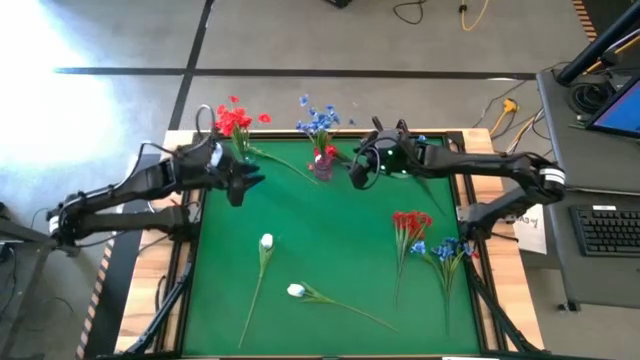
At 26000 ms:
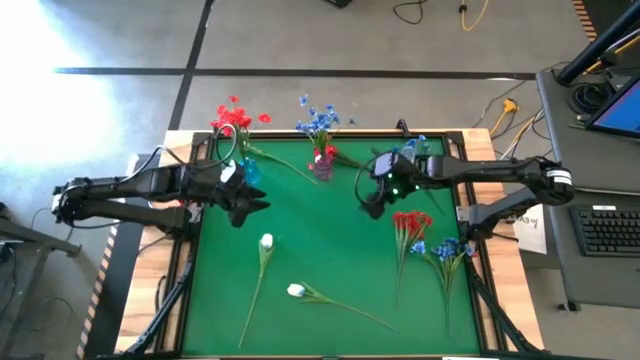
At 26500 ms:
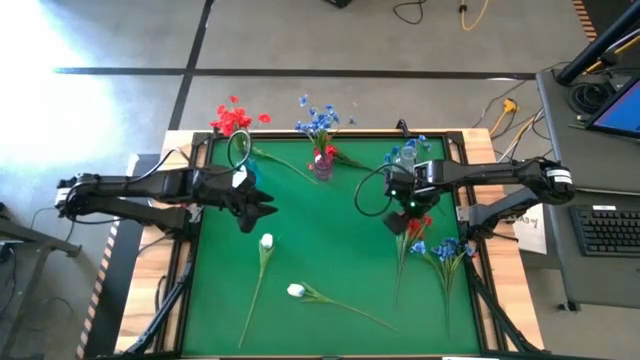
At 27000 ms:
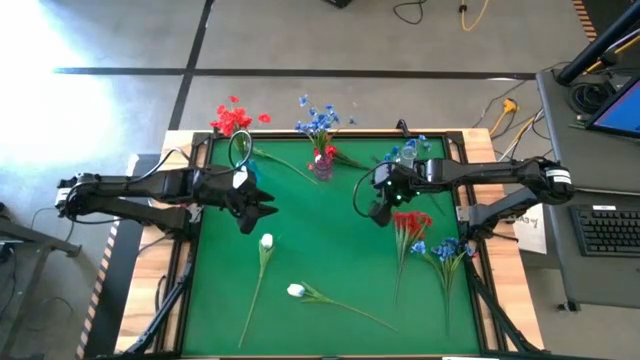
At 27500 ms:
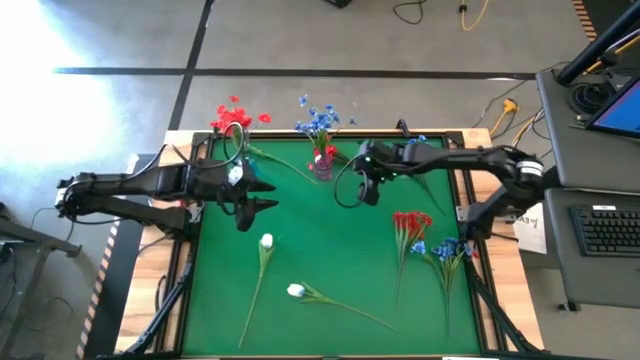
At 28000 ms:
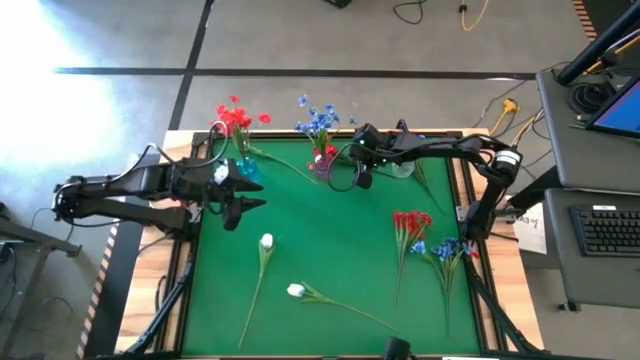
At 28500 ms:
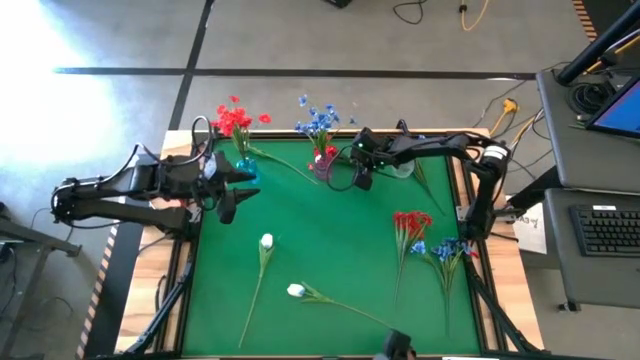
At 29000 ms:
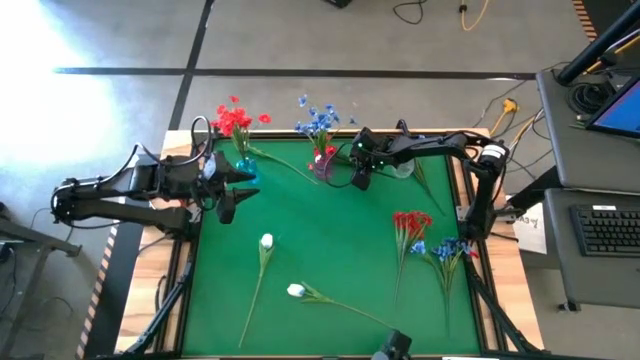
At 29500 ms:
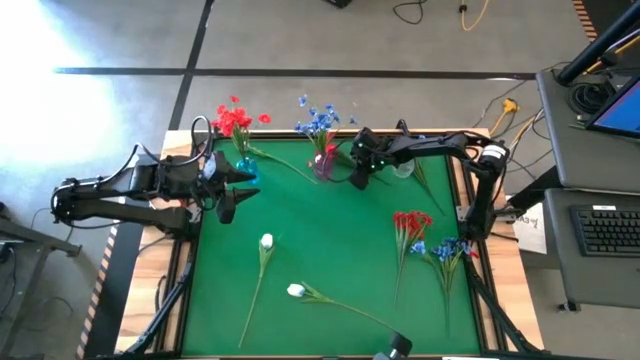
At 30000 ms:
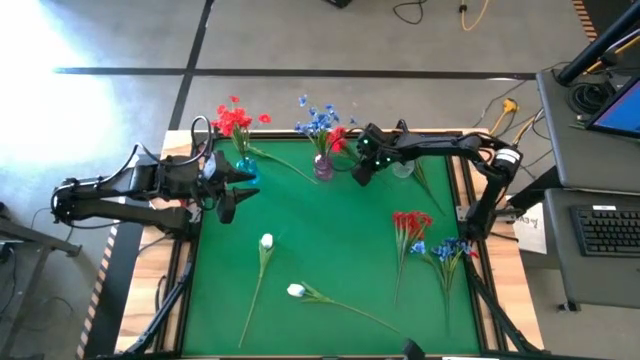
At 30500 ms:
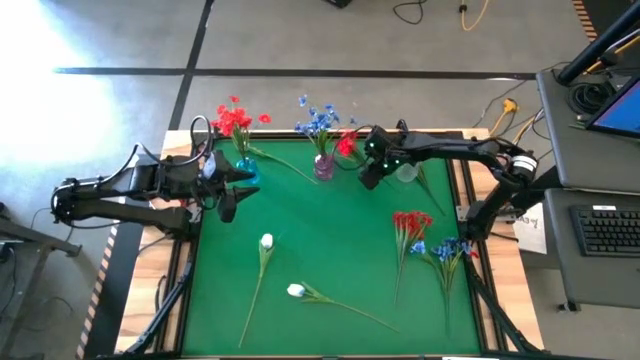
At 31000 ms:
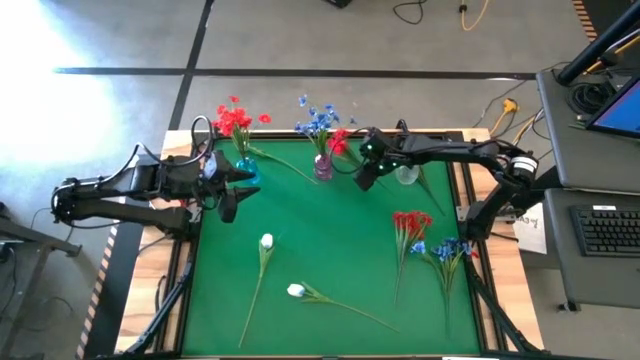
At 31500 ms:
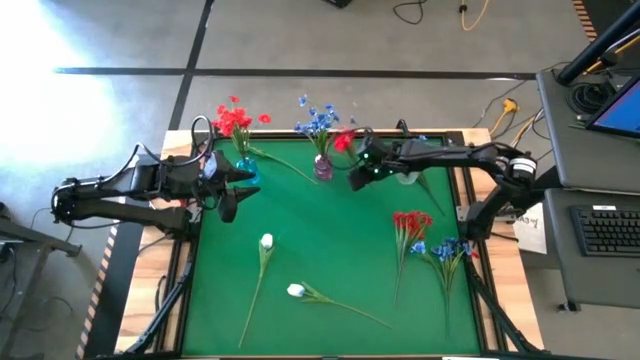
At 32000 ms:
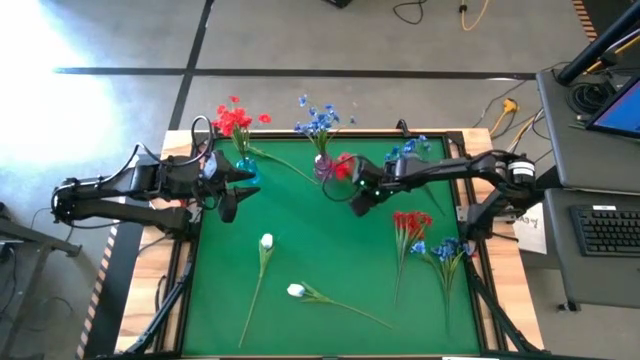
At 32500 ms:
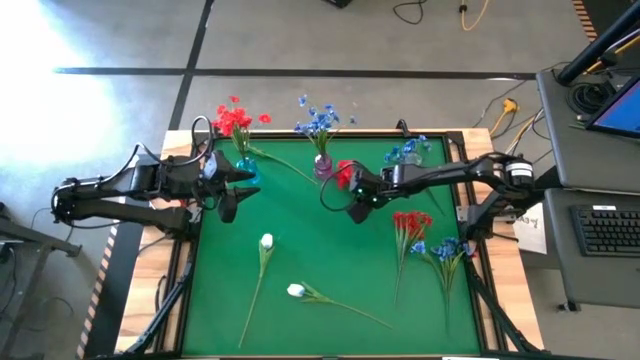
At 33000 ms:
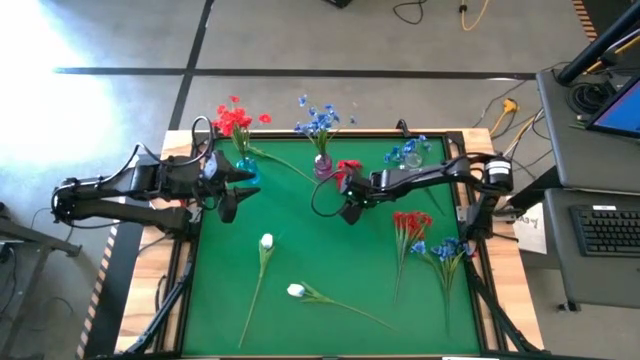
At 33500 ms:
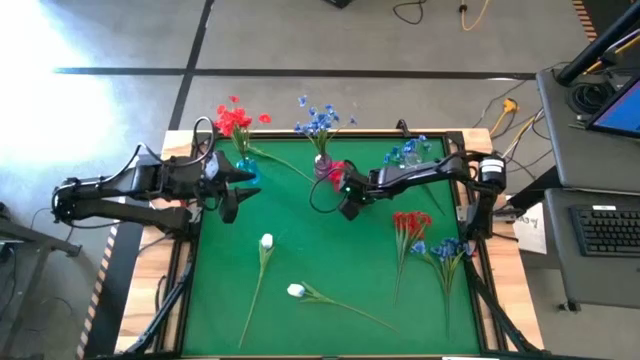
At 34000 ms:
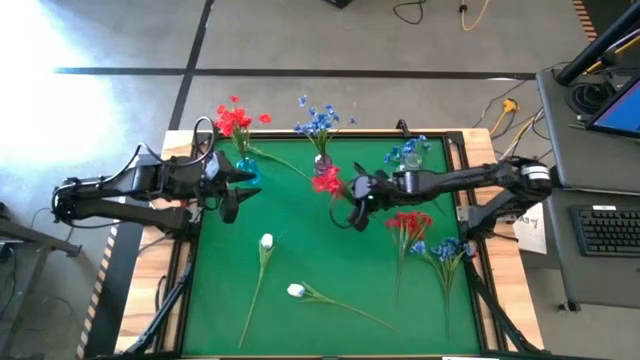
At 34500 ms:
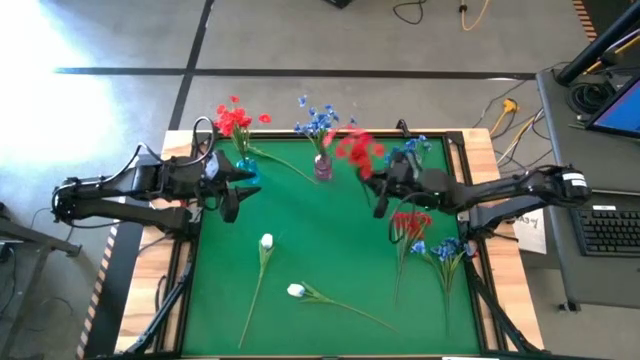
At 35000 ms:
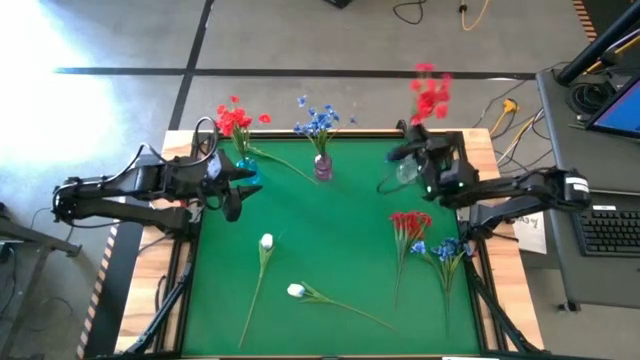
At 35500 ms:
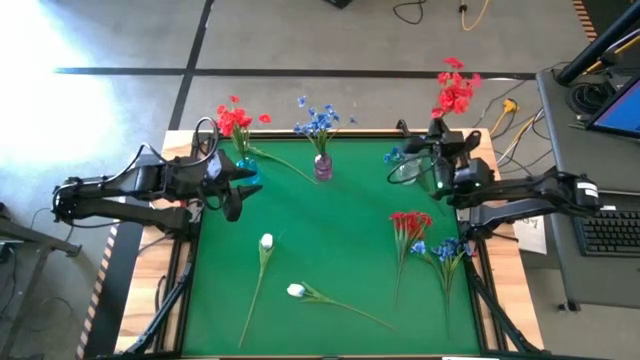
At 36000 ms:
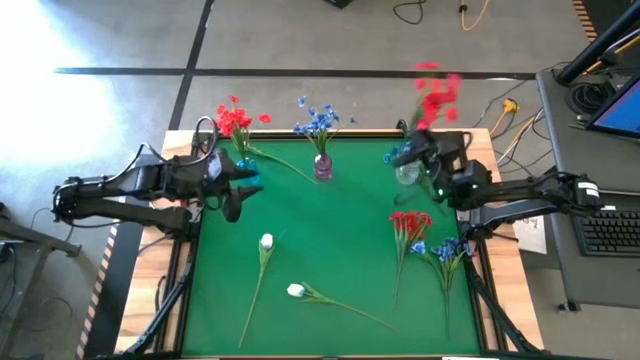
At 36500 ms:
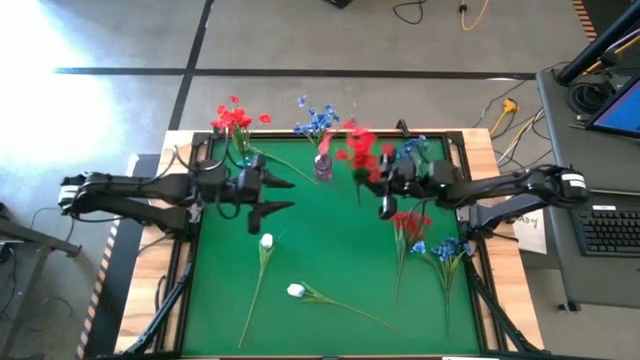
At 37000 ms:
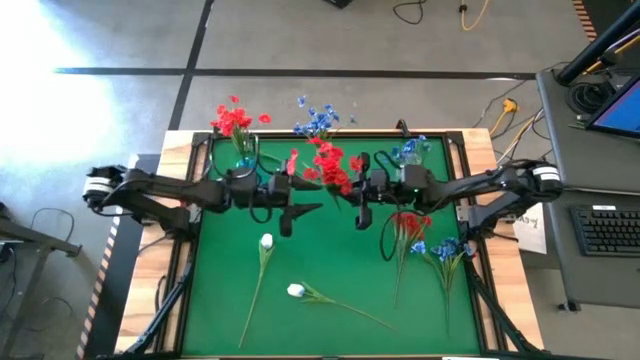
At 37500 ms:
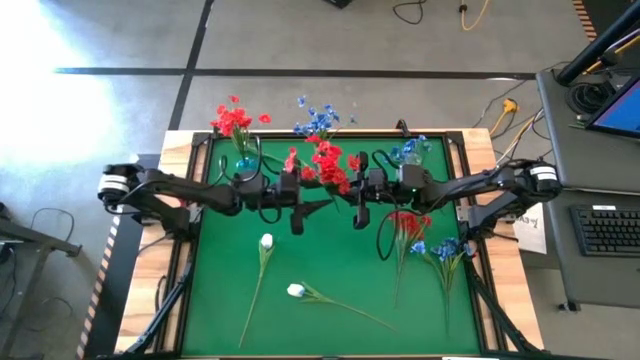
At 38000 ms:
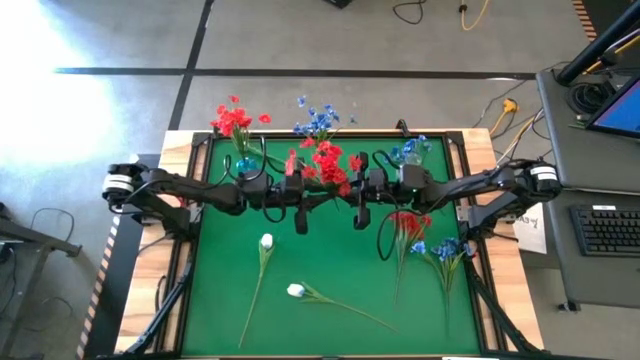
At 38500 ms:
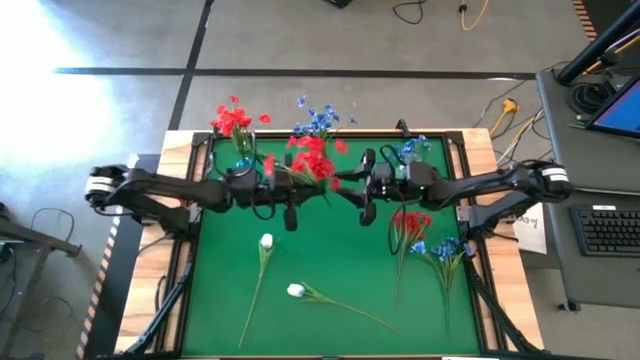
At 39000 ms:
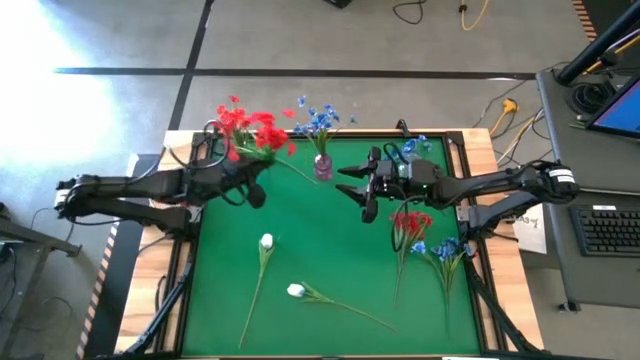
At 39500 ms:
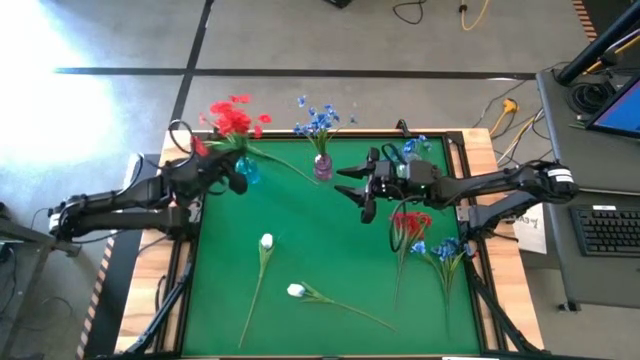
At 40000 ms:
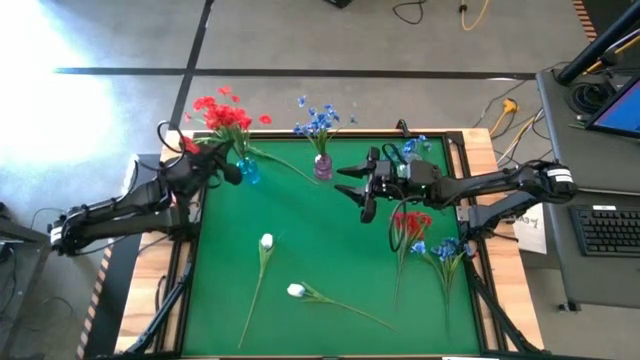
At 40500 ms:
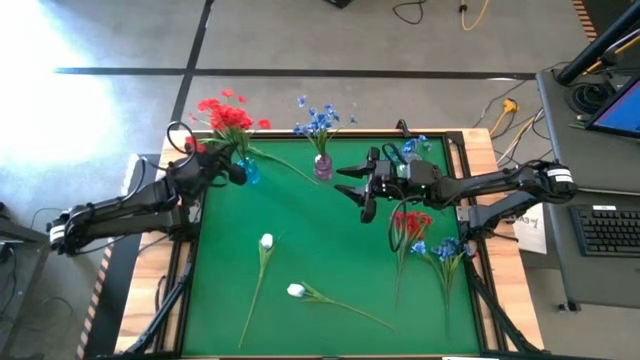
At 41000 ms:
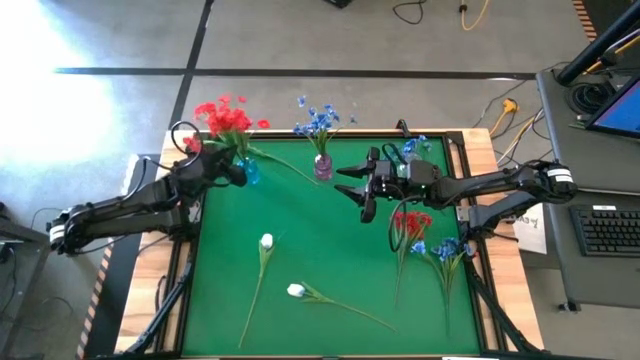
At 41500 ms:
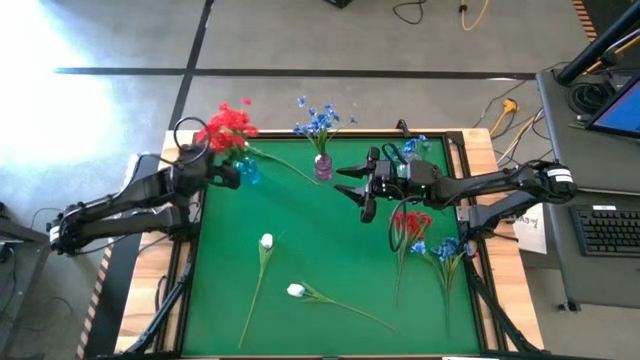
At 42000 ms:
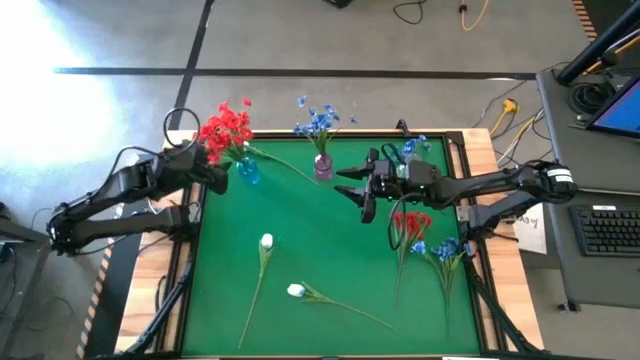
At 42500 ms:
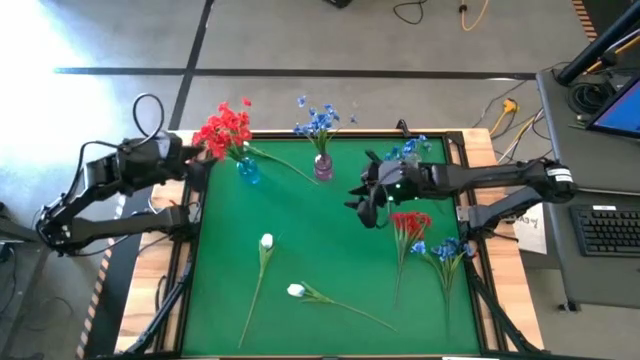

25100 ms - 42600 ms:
Task: Sort flowers into vase by color
Put the top red flowers into the blue vase

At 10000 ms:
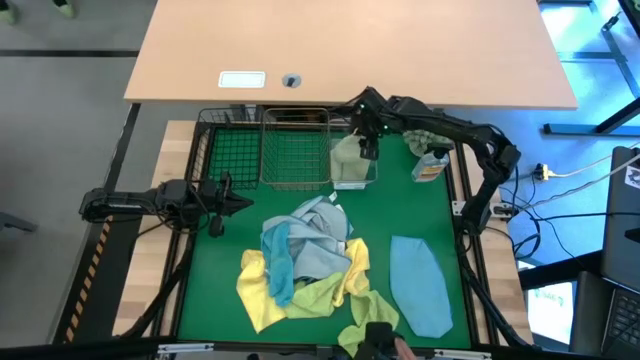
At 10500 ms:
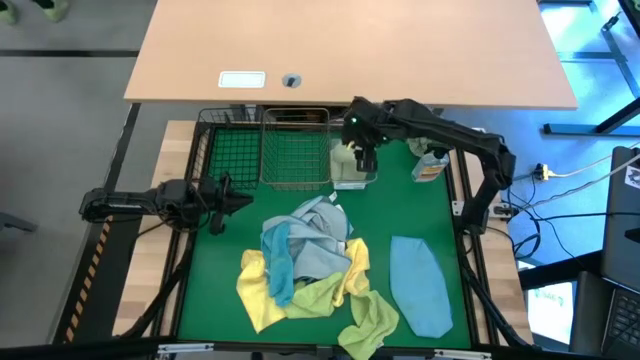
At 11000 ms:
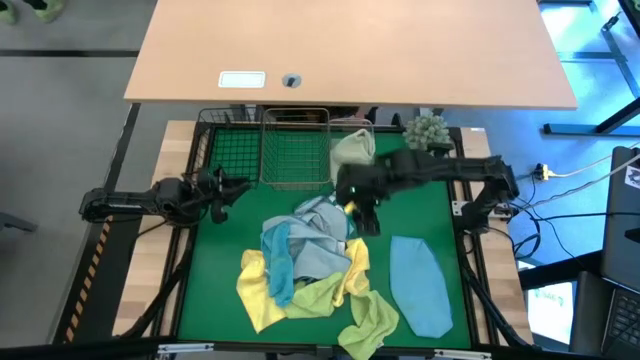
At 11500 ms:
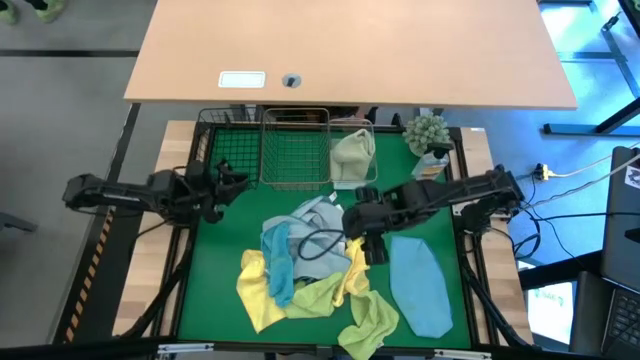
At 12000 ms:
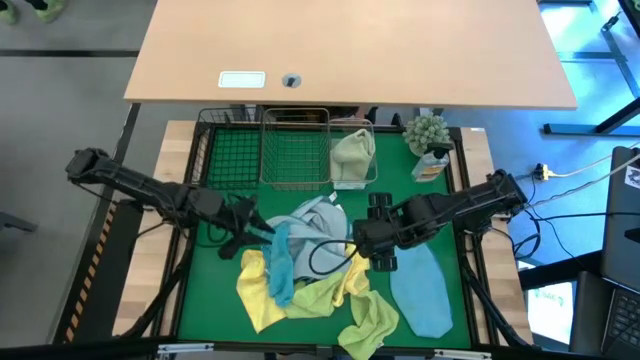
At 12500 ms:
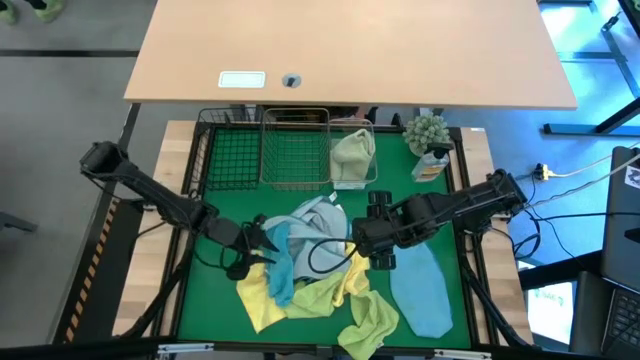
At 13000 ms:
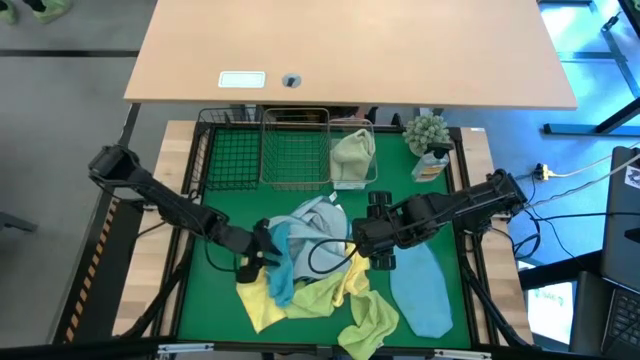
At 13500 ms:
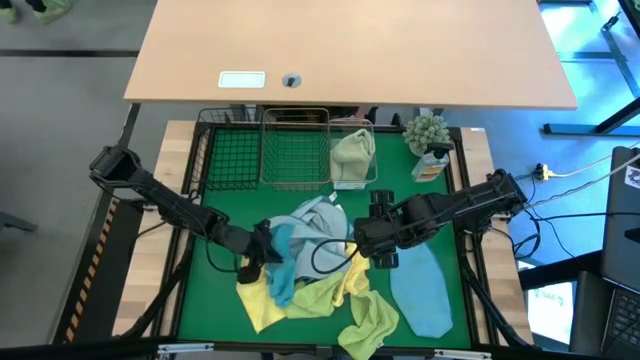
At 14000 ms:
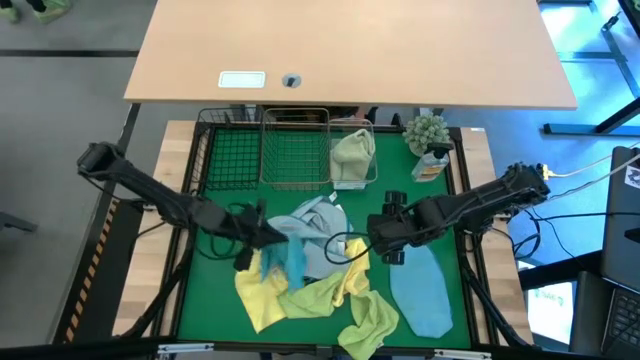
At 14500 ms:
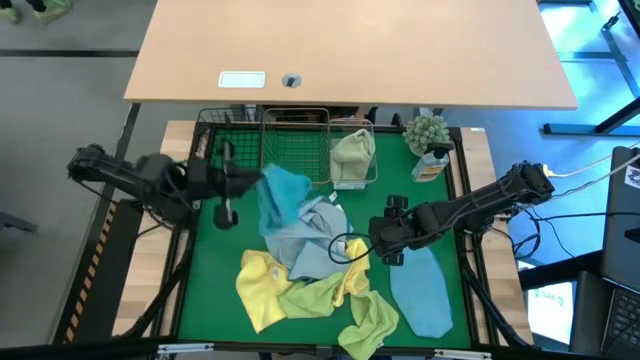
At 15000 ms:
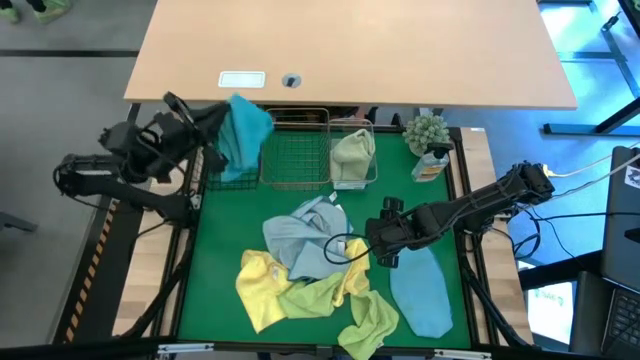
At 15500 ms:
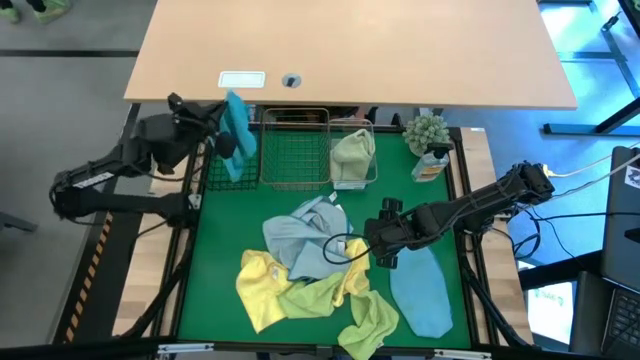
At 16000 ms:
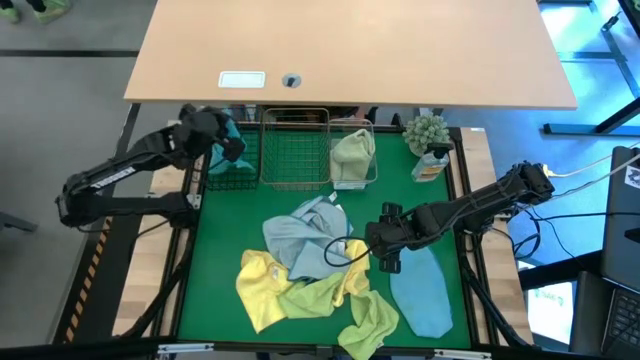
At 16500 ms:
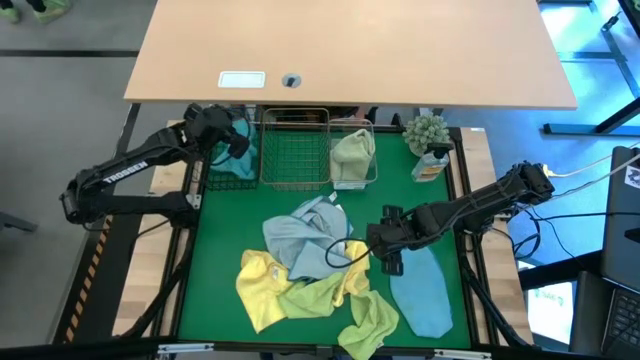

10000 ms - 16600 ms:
Task: Sort microfiber towel by color & place in baskets
Put the blue microfiber cloth into the black wire basket
